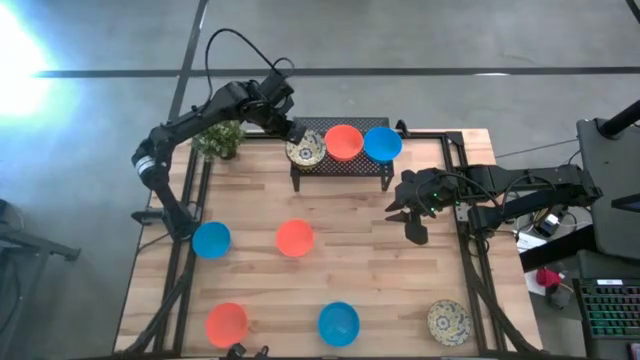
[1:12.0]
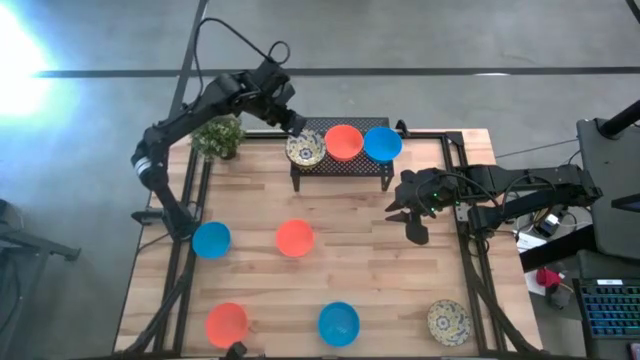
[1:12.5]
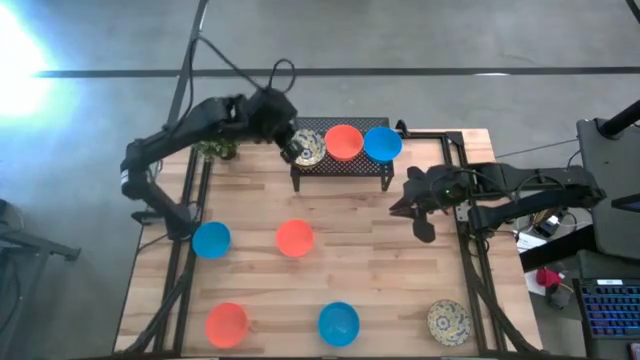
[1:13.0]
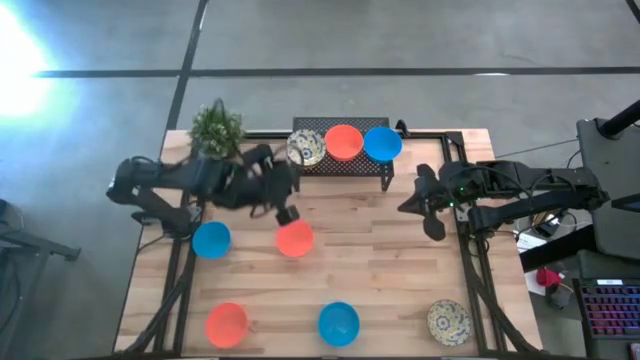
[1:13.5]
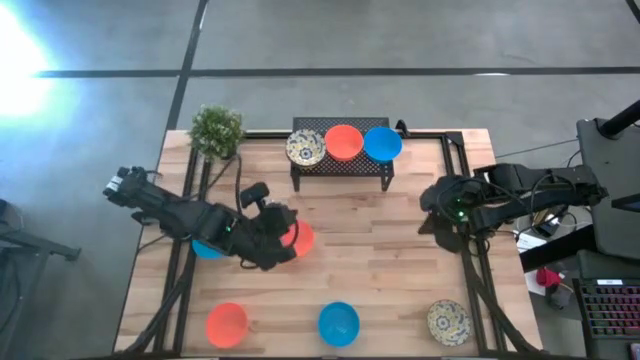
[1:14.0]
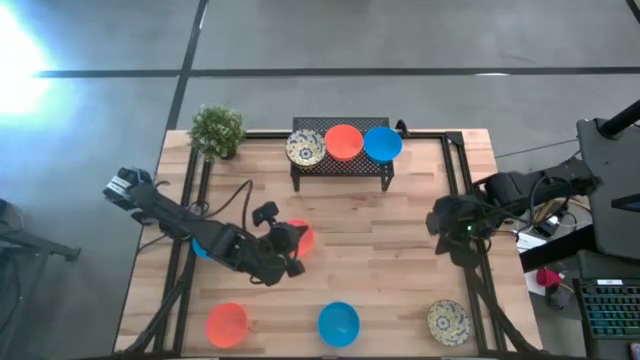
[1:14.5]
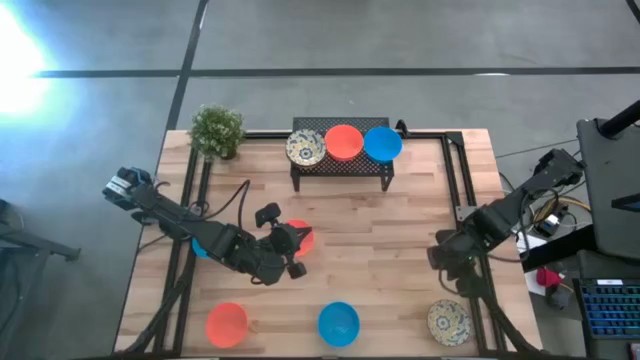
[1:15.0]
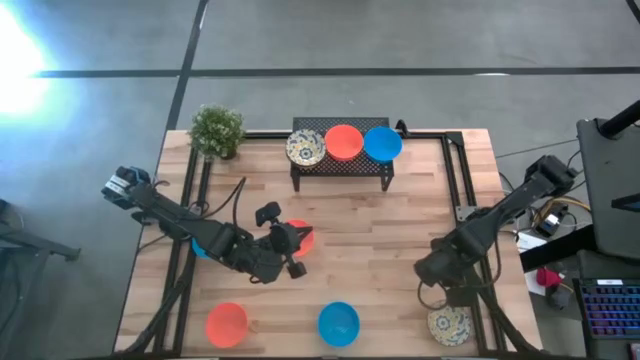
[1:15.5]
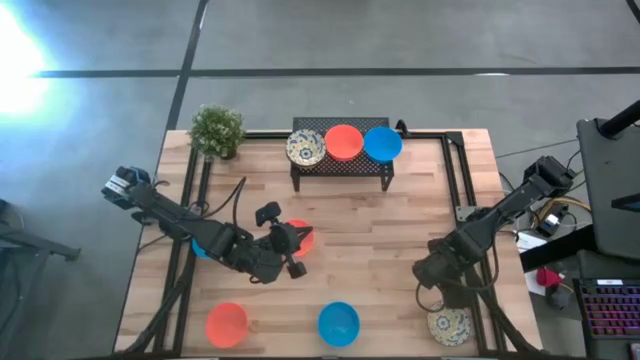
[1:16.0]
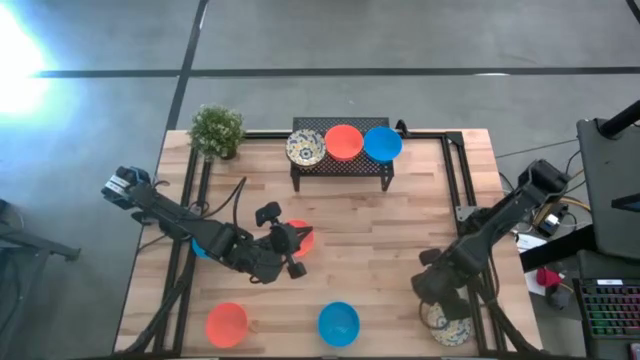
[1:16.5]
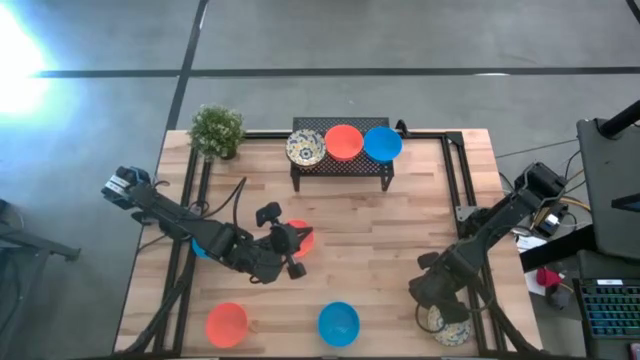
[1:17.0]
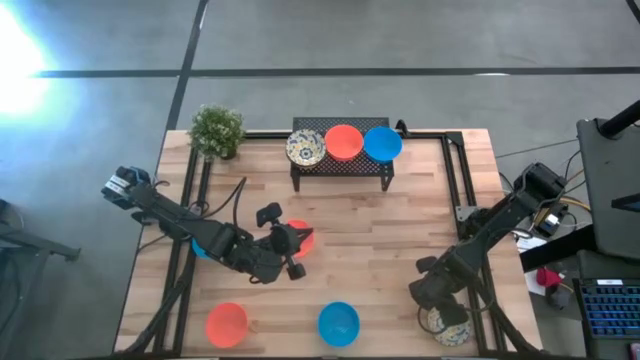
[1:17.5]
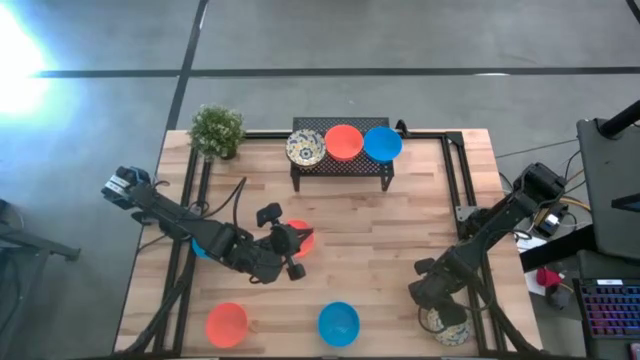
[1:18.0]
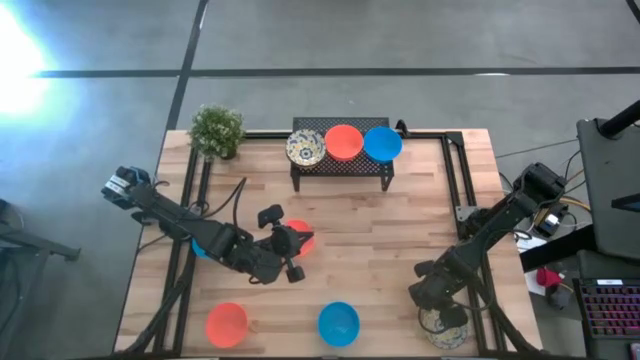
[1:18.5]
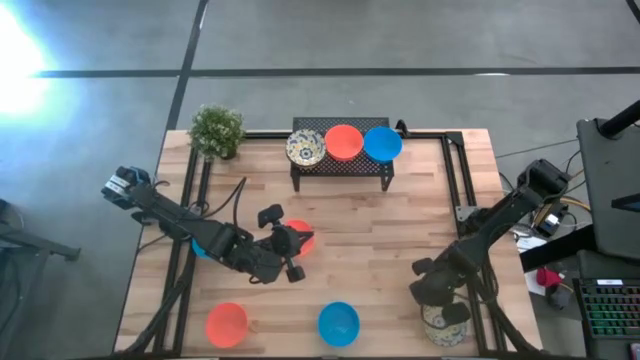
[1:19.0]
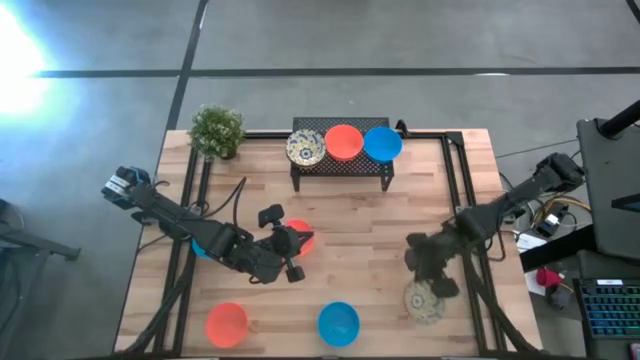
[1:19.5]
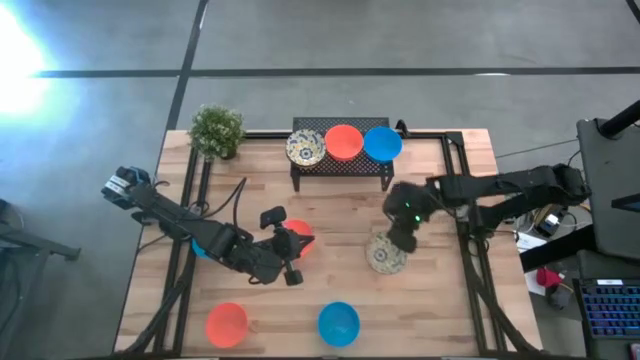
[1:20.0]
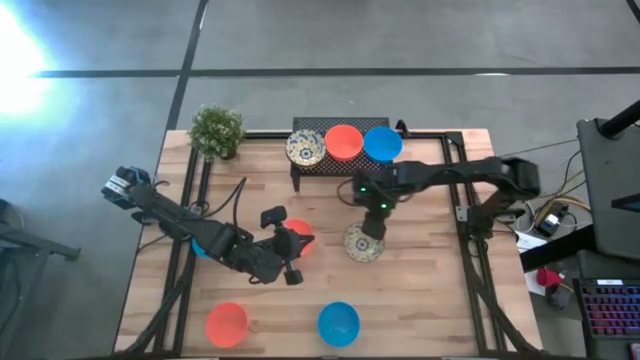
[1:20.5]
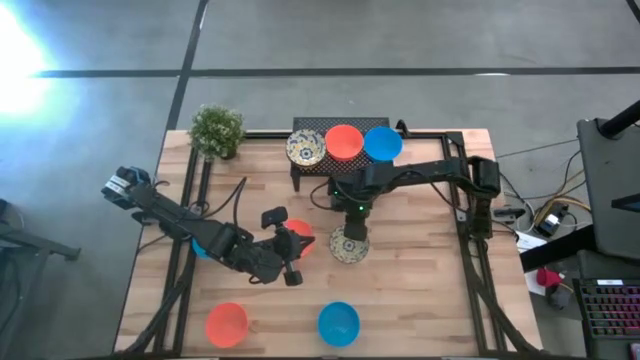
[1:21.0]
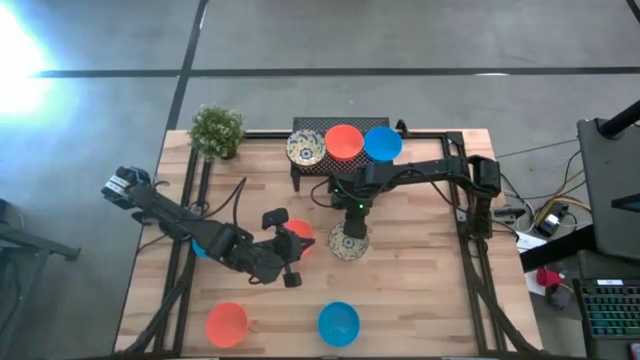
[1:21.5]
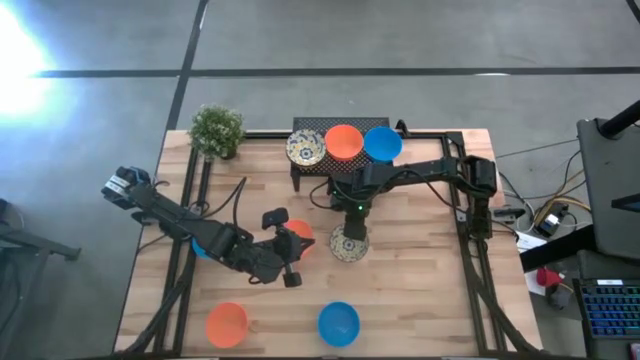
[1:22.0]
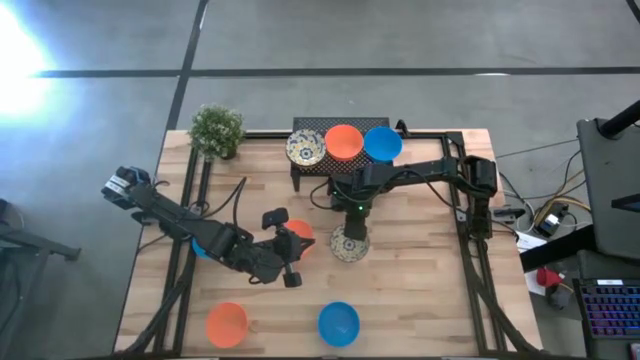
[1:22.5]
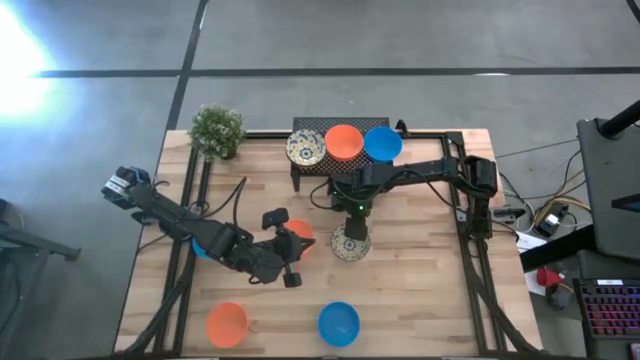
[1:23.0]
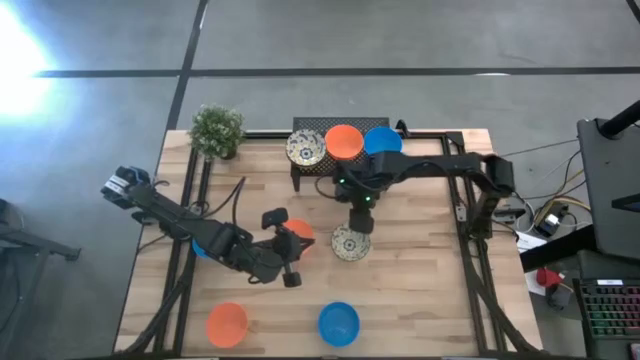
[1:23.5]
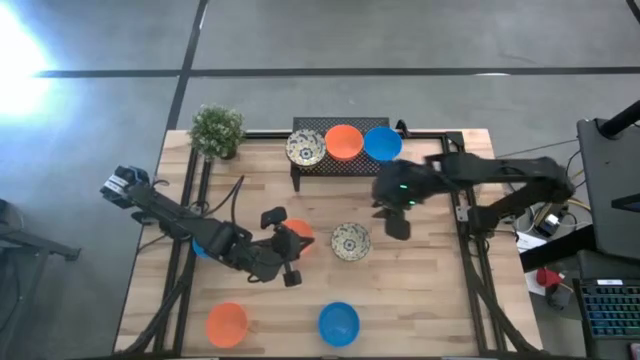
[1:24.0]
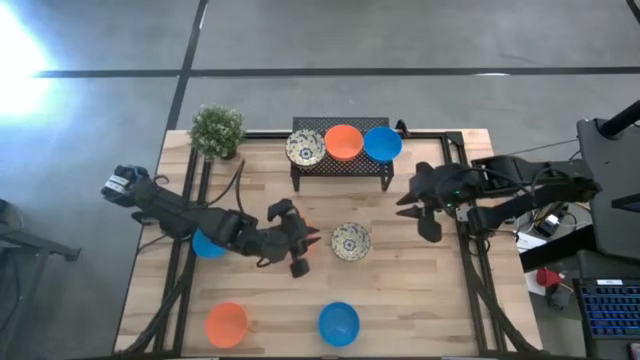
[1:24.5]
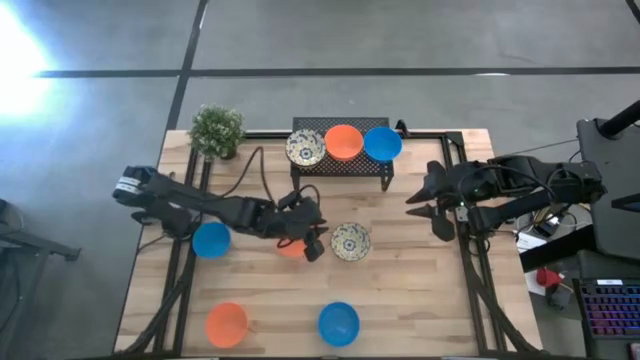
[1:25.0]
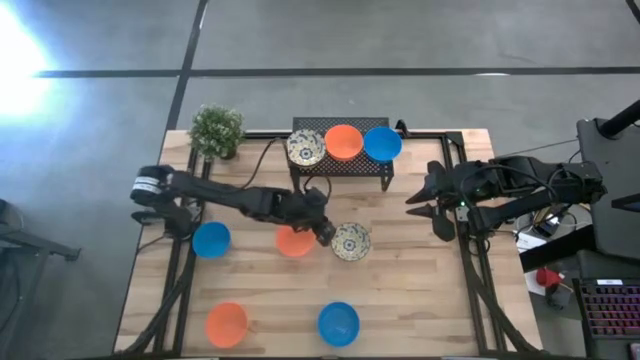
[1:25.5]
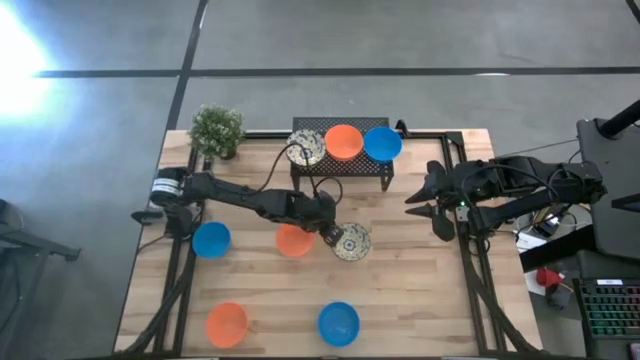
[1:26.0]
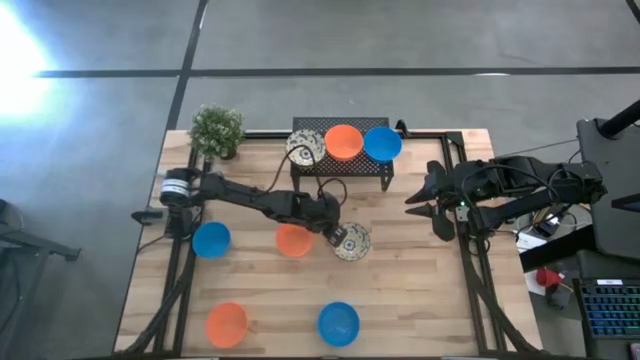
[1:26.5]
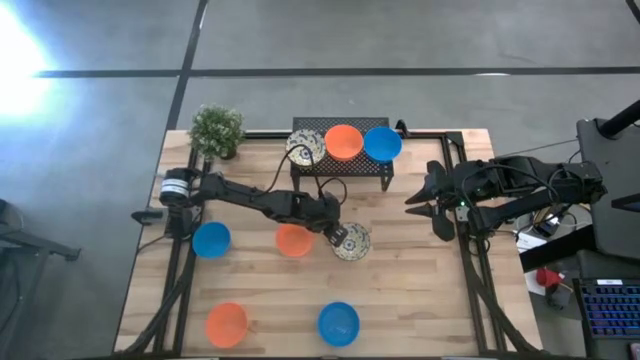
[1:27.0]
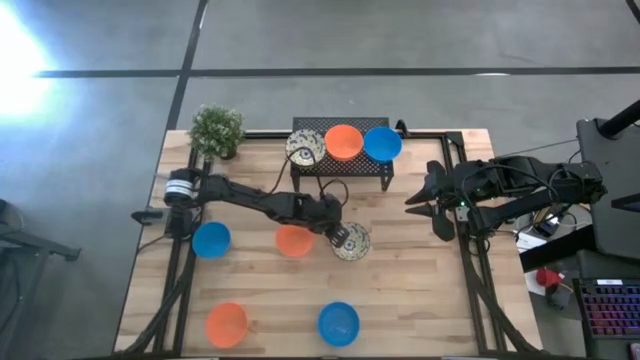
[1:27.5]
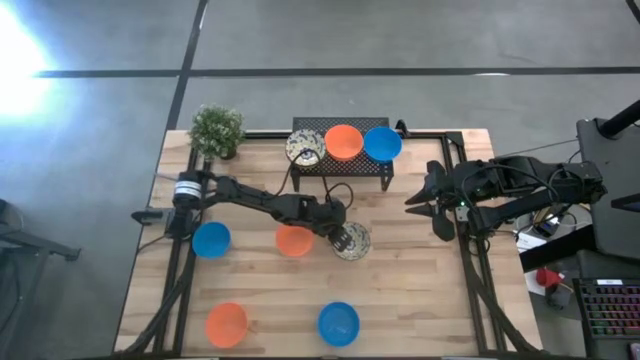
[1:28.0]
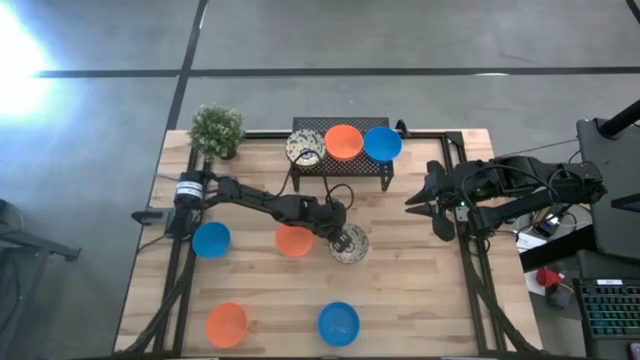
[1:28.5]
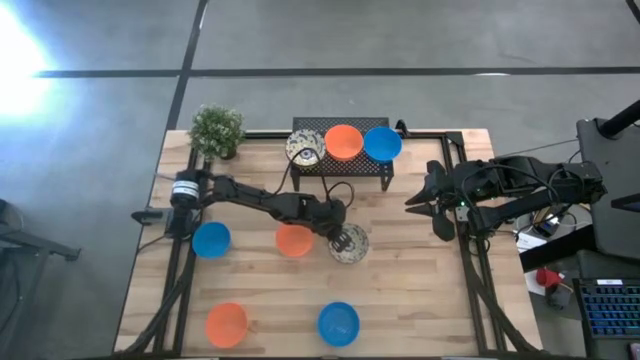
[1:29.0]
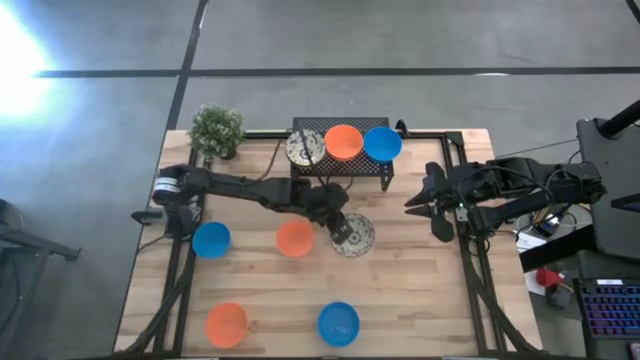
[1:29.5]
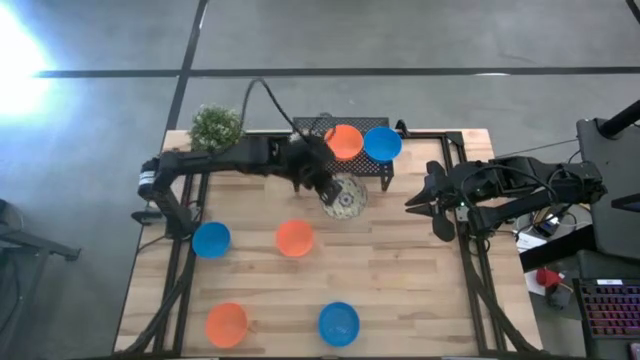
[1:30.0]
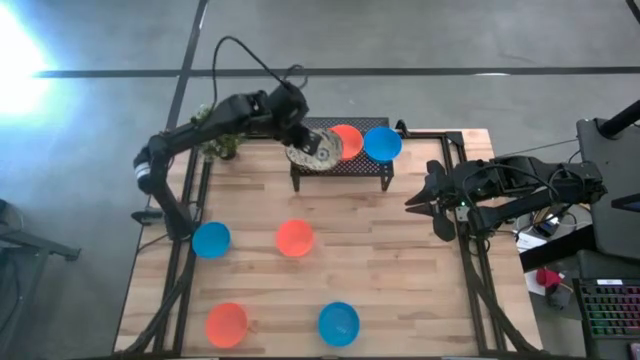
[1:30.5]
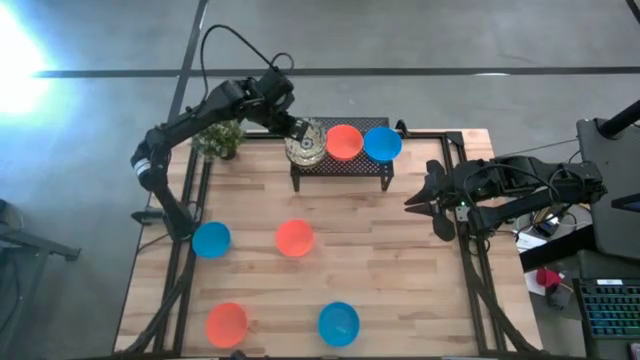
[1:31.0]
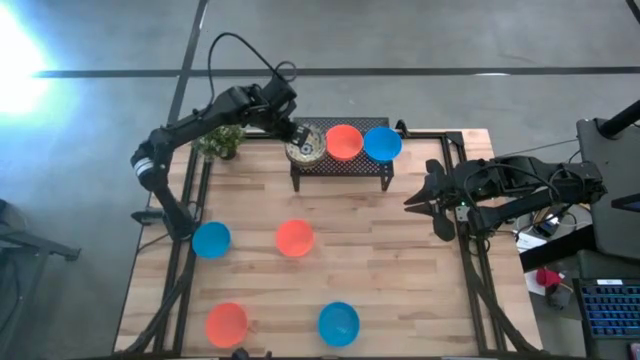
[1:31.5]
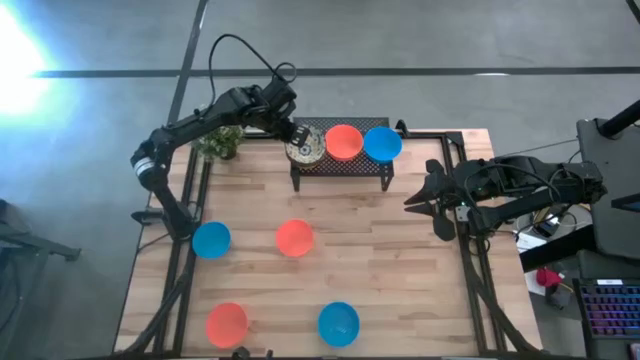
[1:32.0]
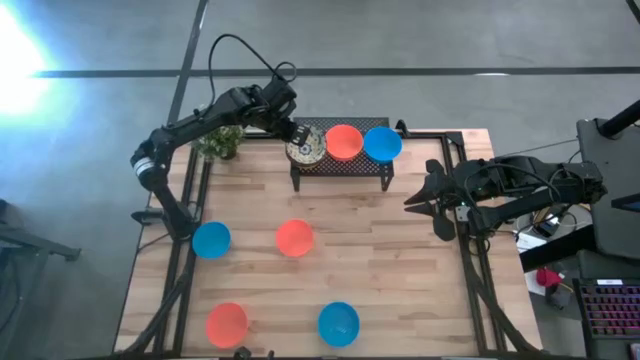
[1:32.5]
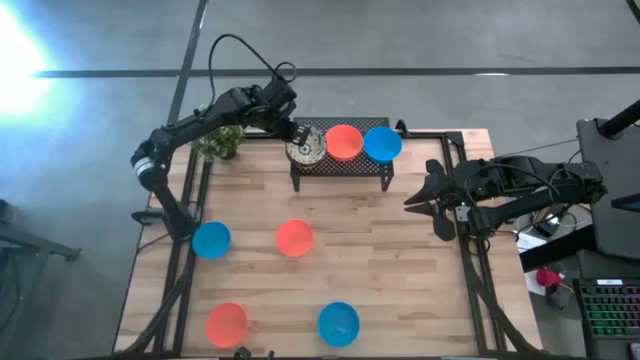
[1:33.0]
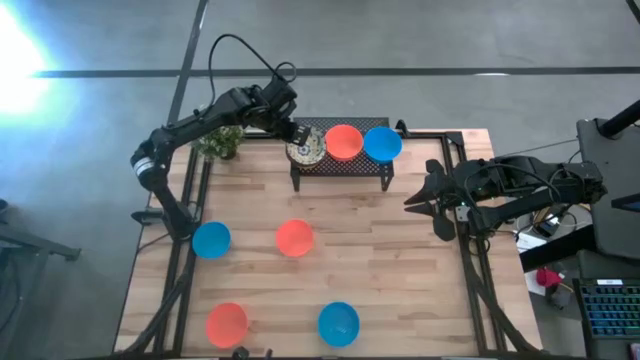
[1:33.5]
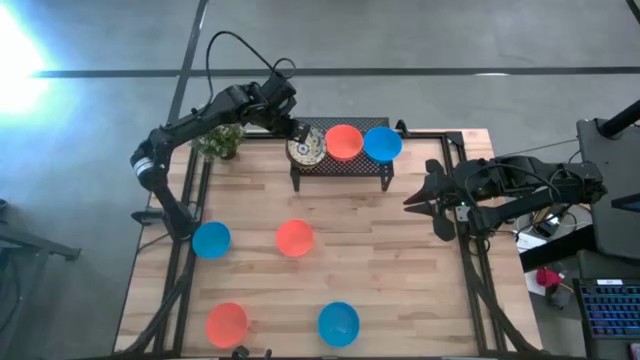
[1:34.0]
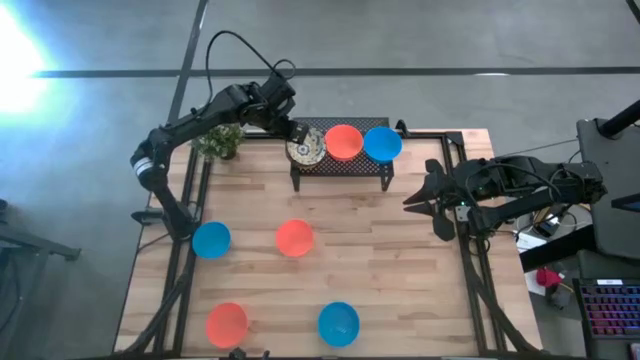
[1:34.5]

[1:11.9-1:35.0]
Task: Pick & Place Mini bowls
Stack the yellow patterned bowl on the yellow patterned bowl on the shelf
